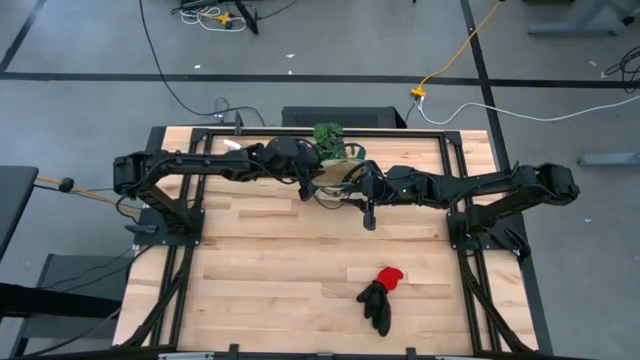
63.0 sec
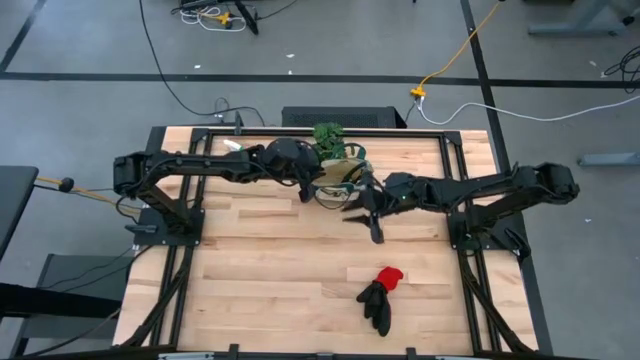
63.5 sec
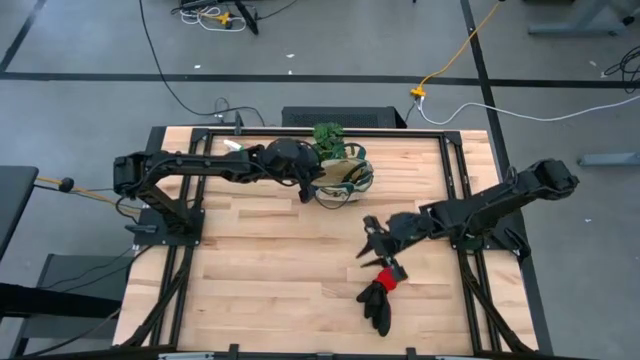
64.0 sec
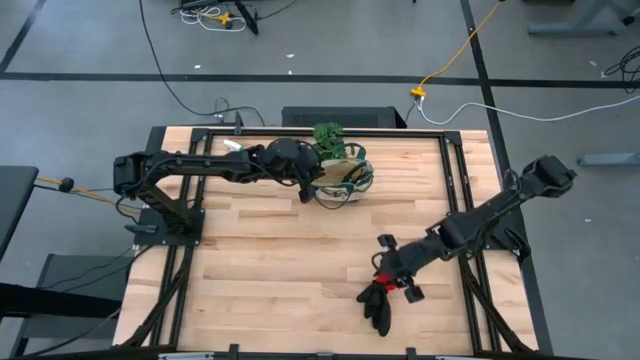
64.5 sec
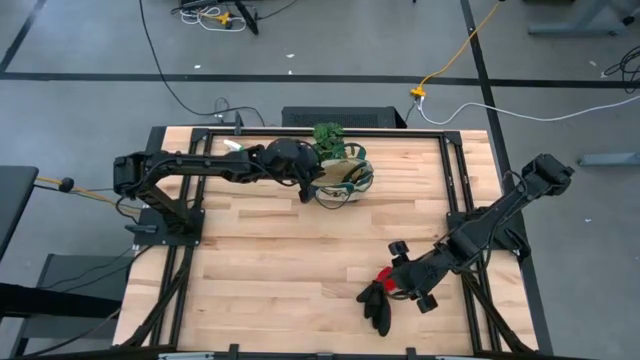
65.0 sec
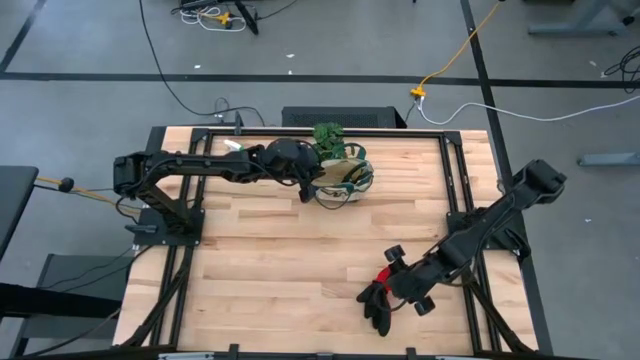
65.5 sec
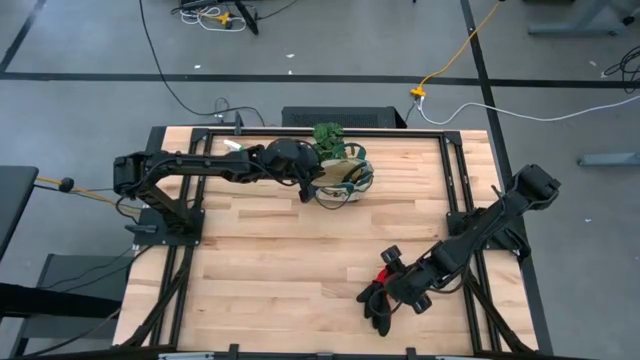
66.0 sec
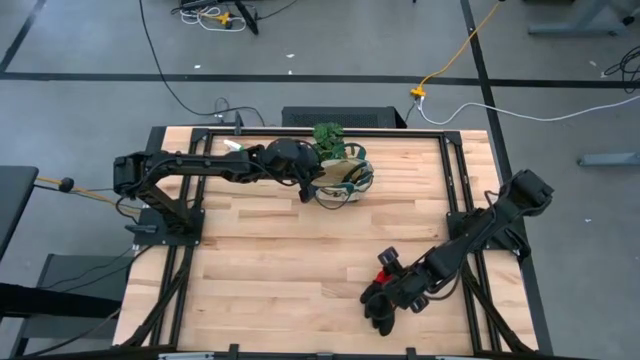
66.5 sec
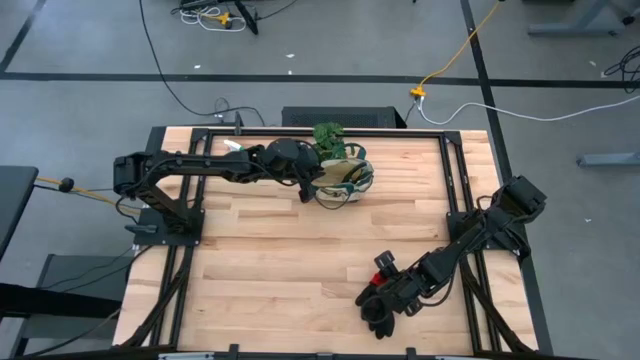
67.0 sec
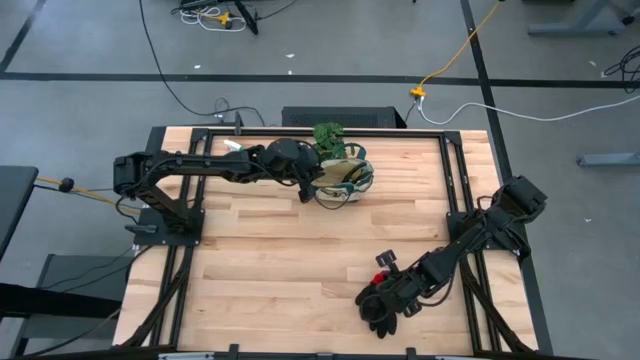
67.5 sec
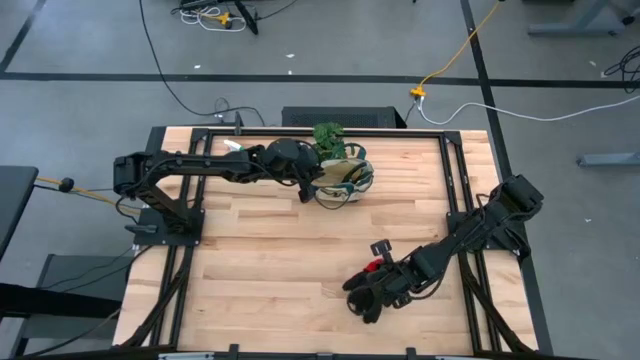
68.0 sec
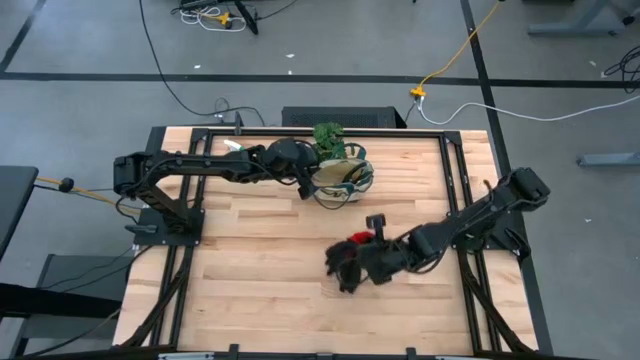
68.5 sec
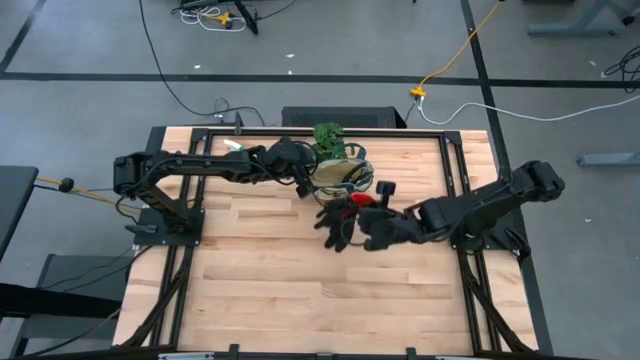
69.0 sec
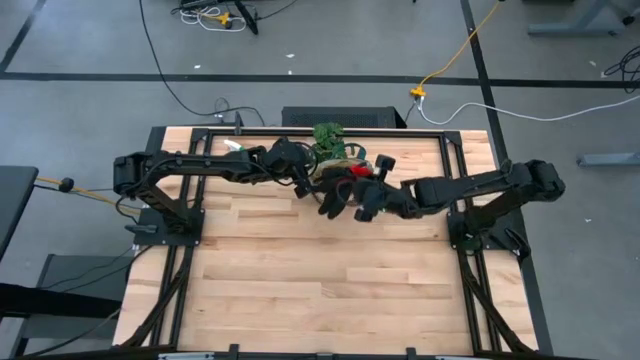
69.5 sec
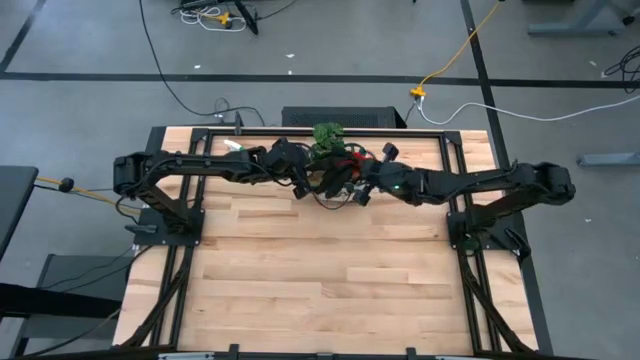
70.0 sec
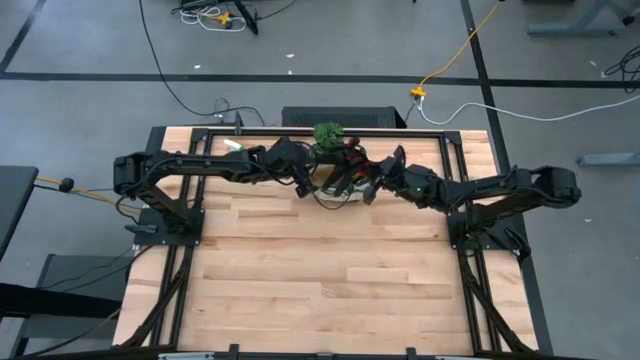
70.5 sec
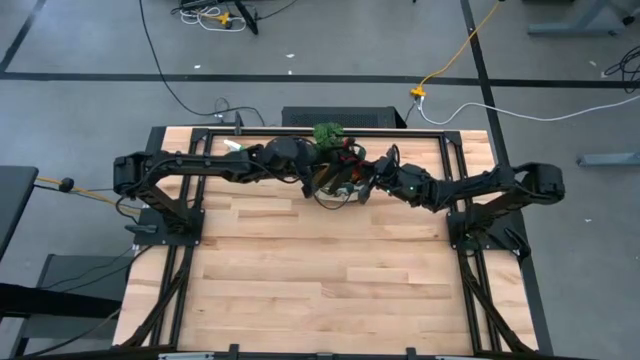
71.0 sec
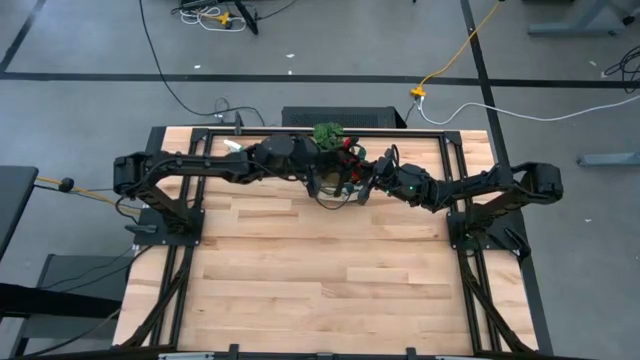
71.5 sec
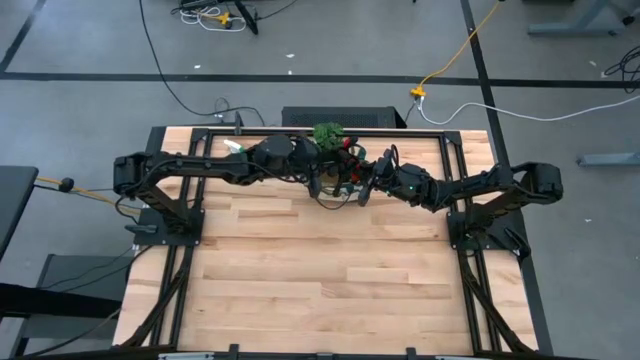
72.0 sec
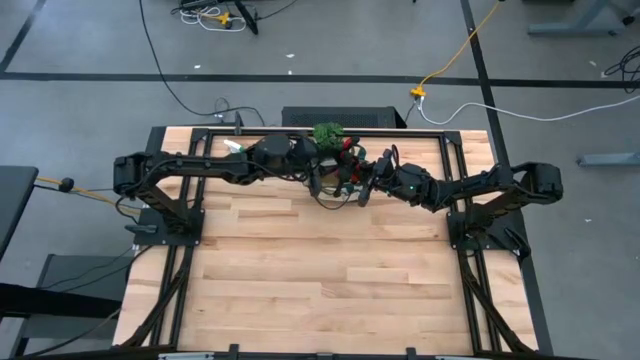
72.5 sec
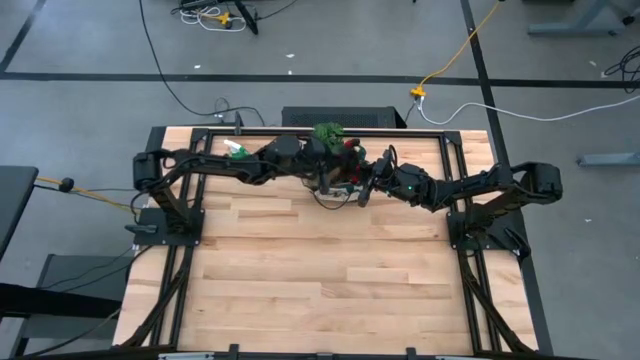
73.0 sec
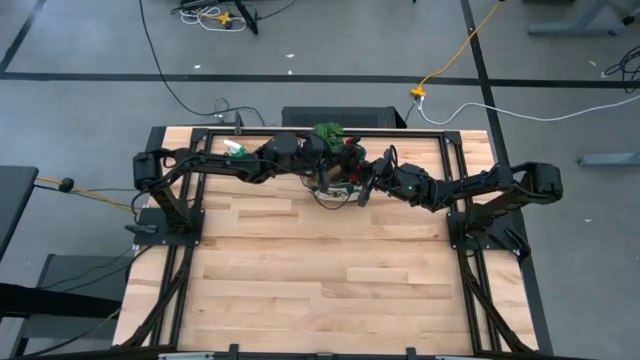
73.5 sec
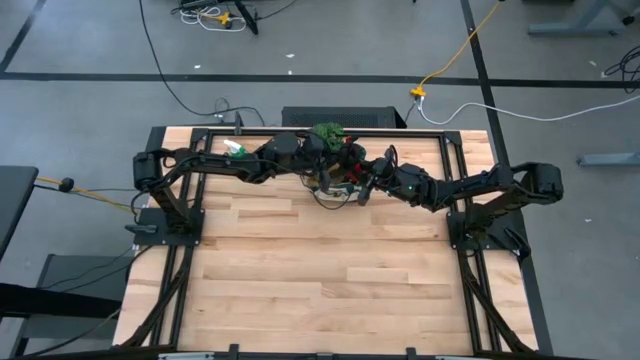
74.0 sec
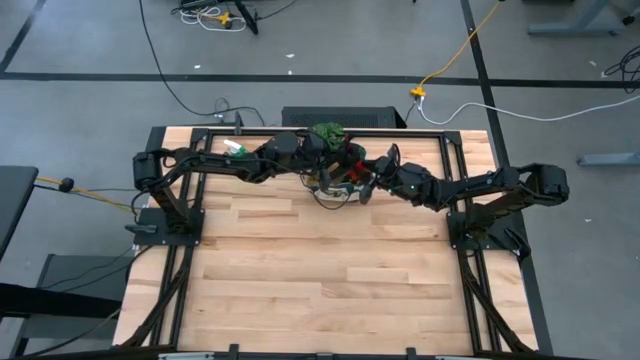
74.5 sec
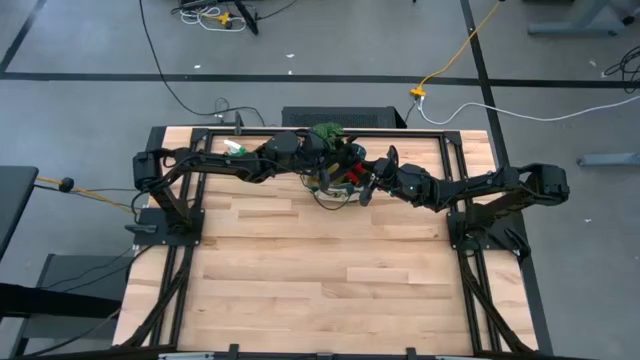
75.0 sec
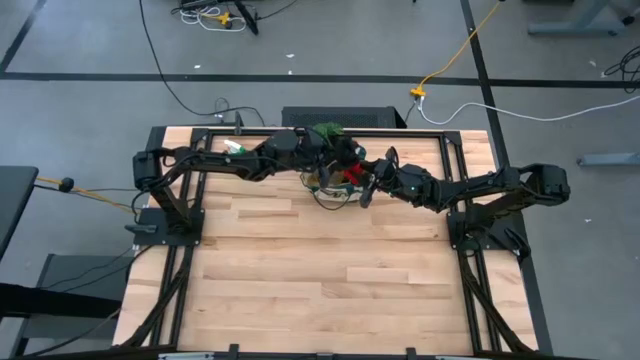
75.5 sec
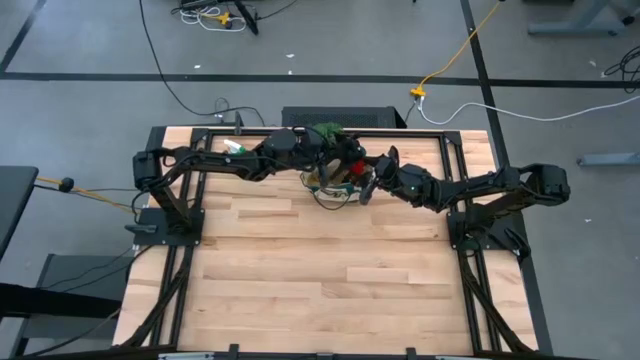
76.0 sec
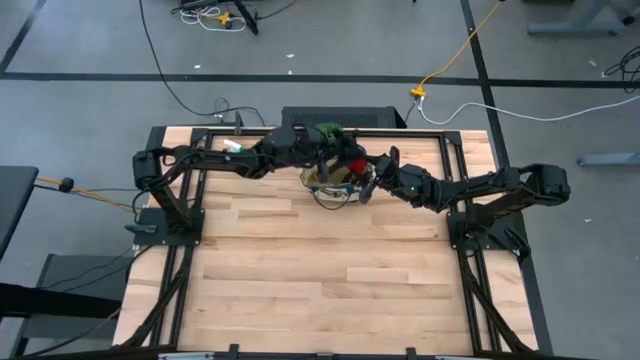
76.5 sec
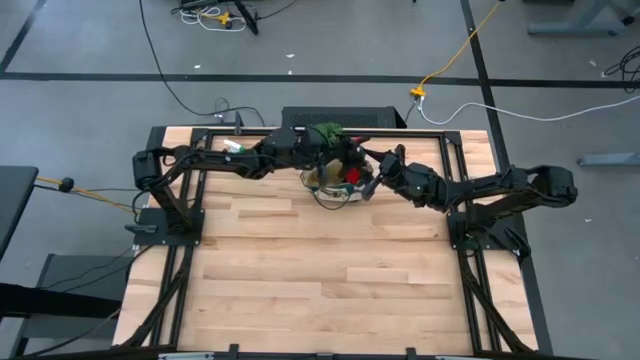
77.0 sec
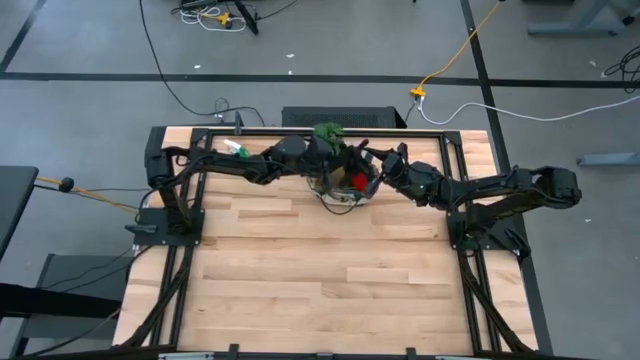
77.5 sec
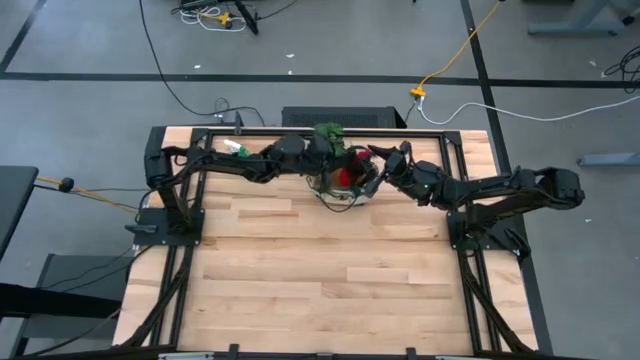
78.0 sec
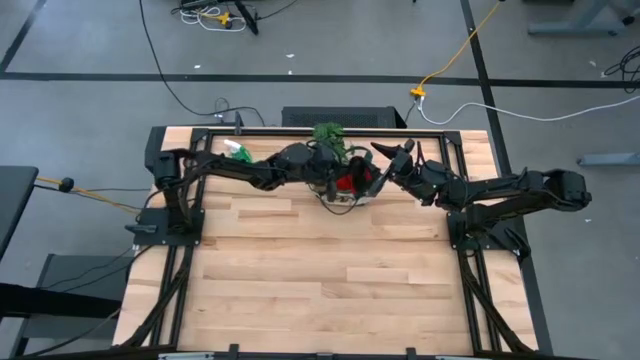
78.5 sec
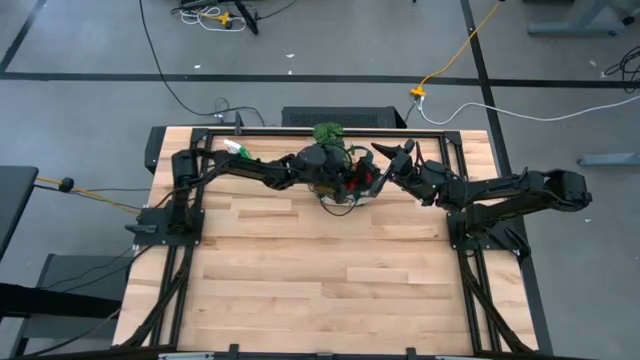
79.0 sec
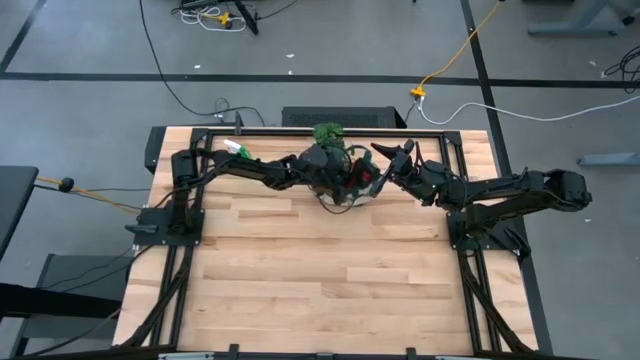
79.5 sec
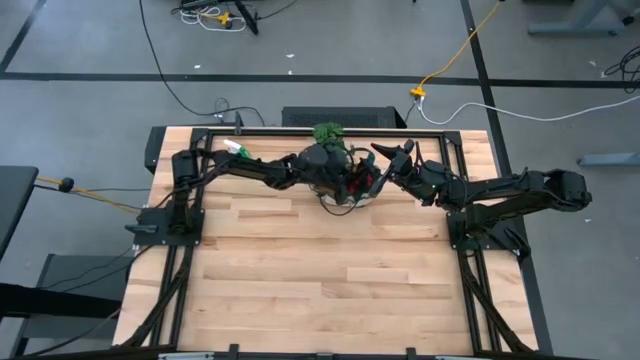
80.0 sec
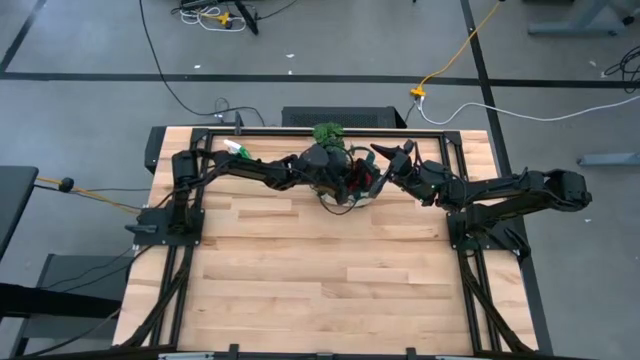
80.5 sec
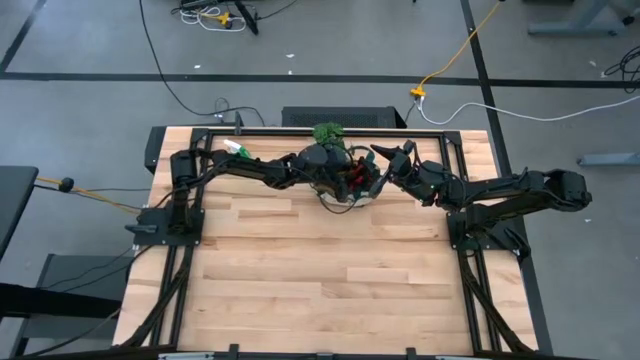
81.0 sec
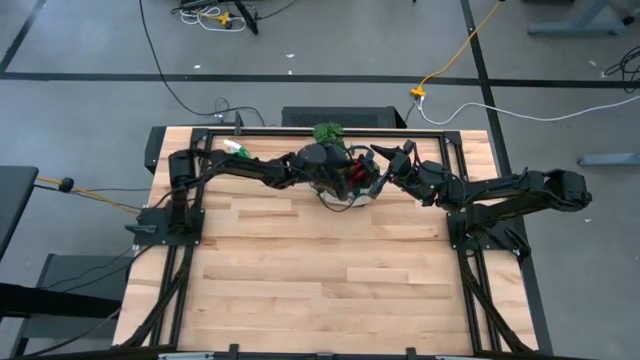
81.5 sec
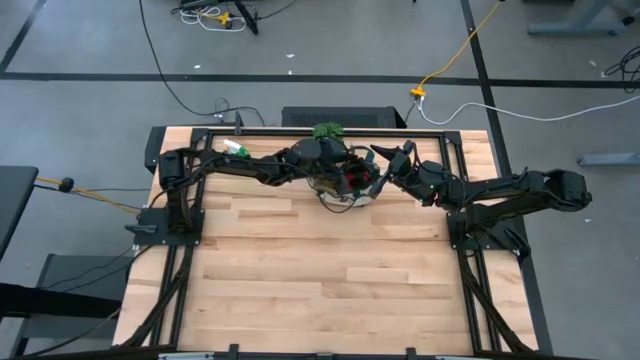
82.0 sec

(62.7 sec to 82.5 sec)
Task: Pick & Place Garden tools in Gardening bag
Put the red gloves into the green gardening bag

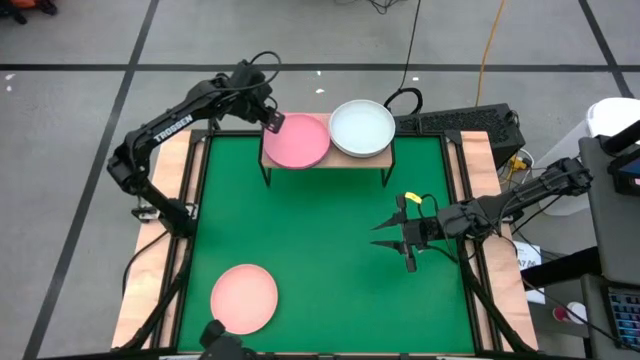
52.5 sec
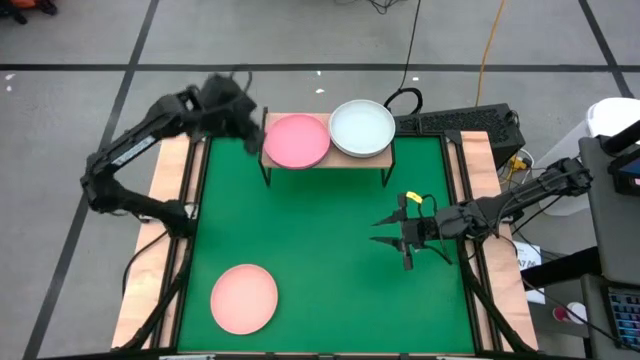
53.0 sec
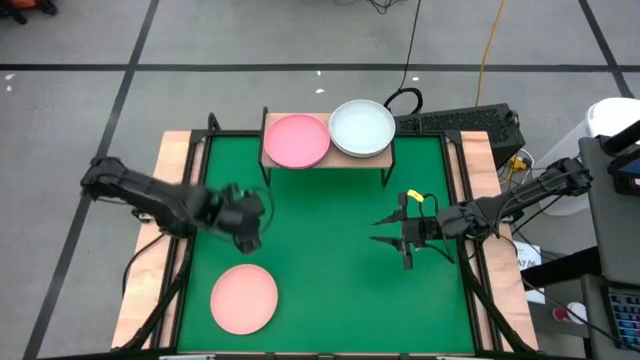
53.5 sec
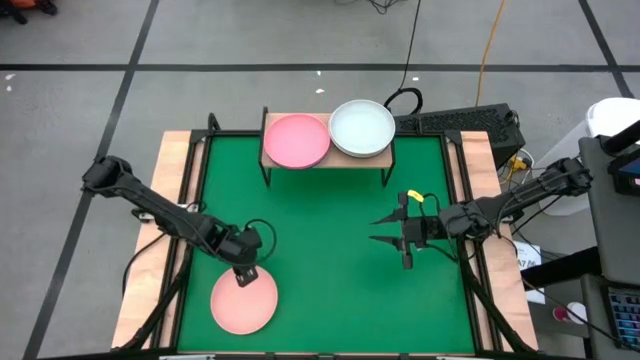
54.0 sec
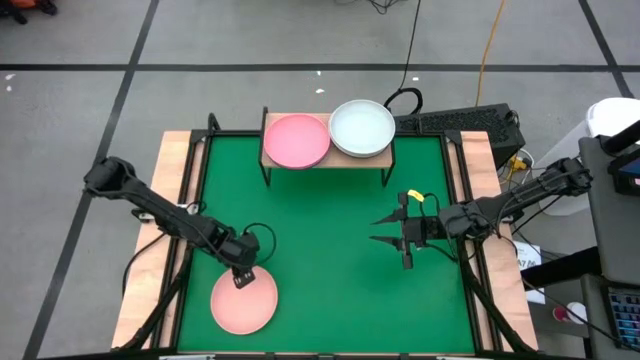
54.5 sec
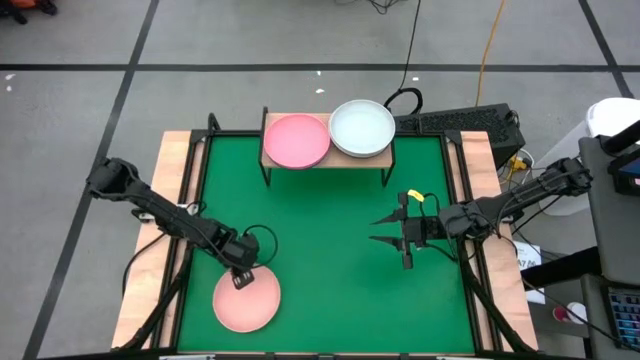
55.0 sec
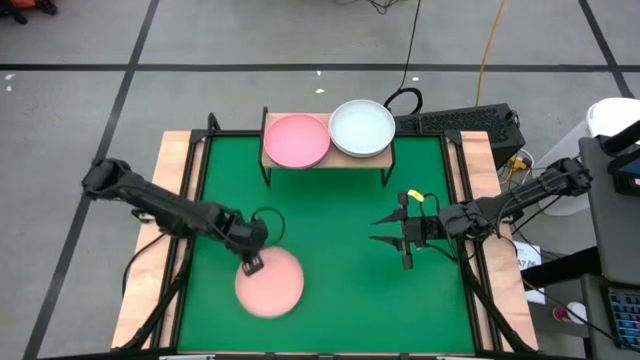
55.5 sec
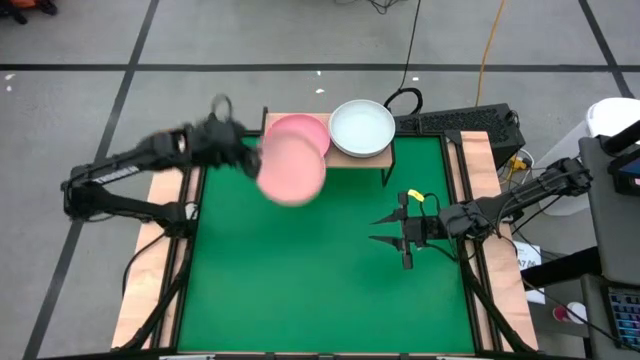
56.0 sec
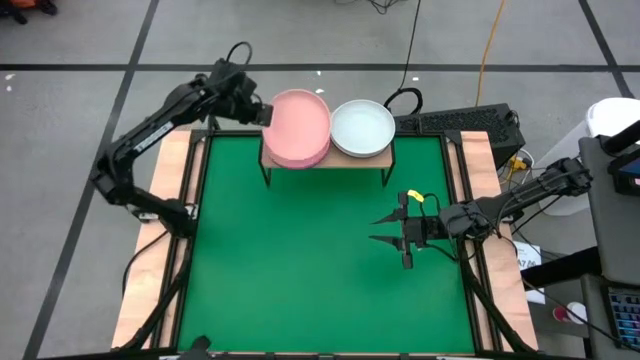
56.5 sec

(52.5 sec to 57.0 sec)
Task: Place and stack plates onto a shelf
Stack the light orange plate on top of the light pink plate on the shelf
